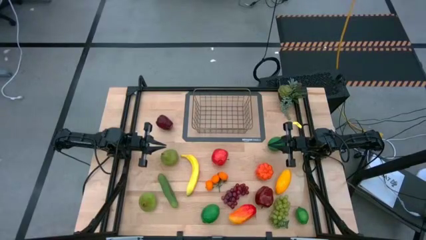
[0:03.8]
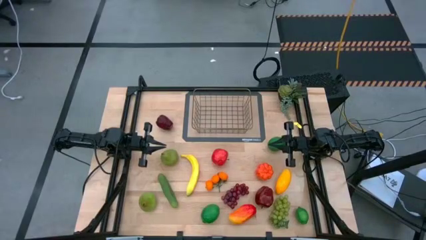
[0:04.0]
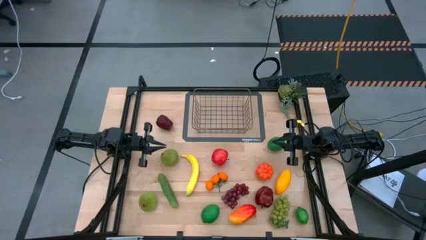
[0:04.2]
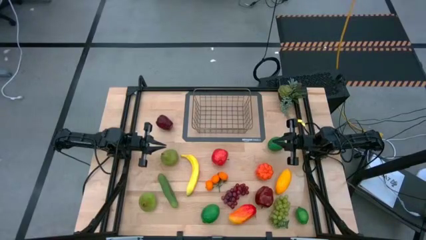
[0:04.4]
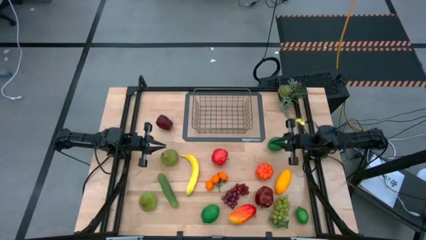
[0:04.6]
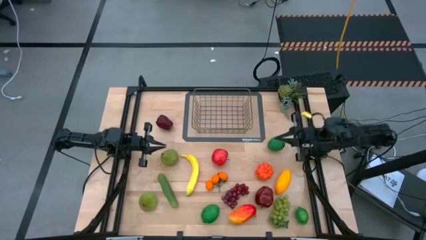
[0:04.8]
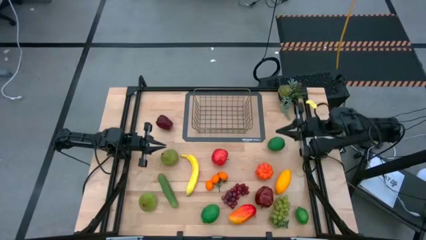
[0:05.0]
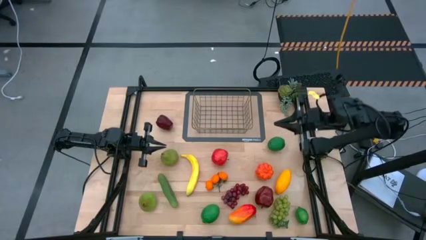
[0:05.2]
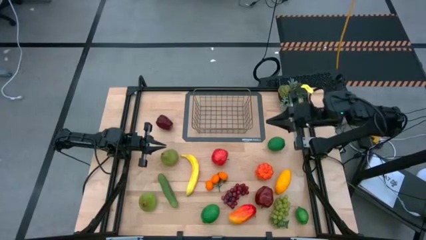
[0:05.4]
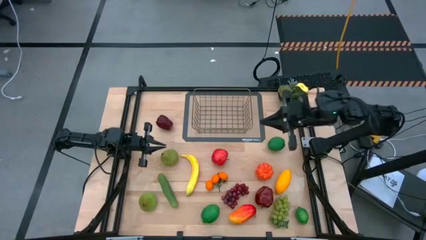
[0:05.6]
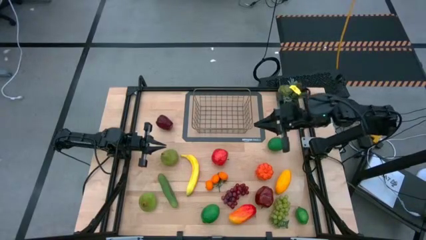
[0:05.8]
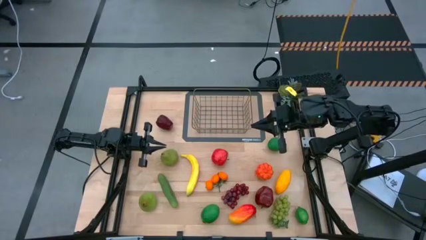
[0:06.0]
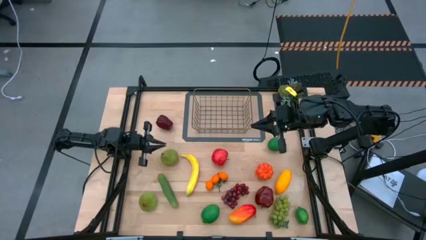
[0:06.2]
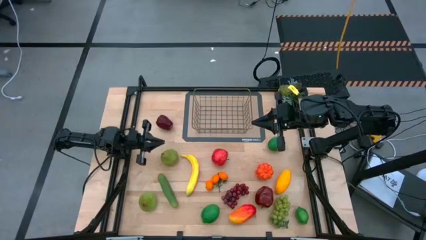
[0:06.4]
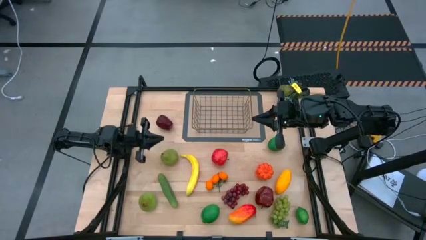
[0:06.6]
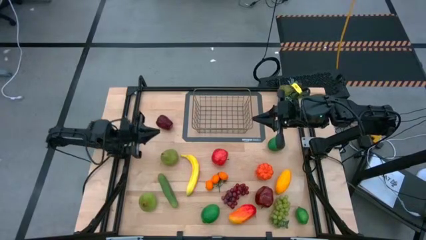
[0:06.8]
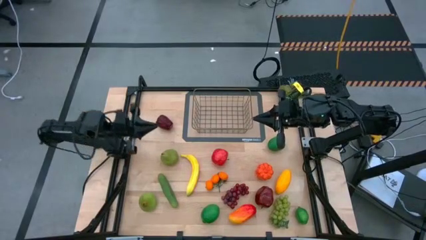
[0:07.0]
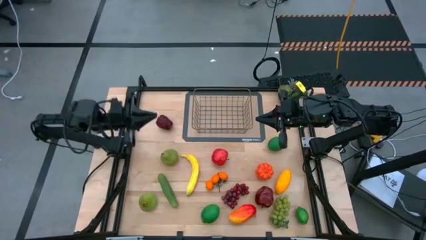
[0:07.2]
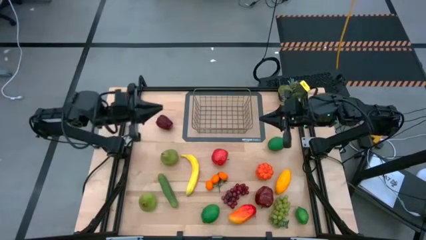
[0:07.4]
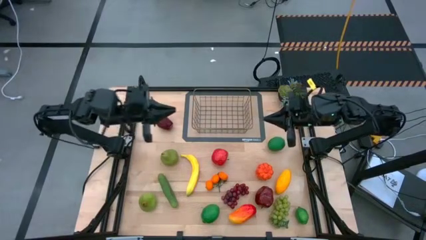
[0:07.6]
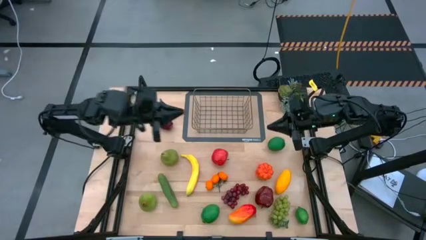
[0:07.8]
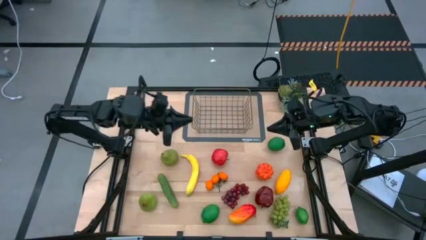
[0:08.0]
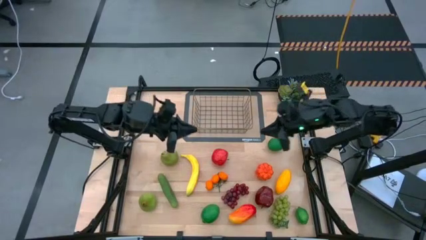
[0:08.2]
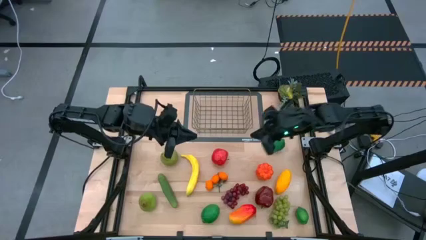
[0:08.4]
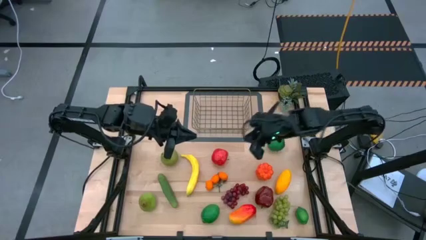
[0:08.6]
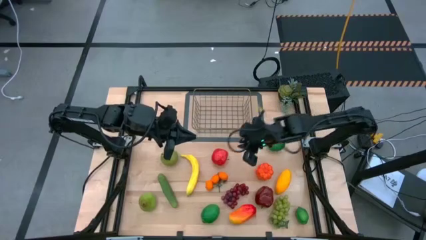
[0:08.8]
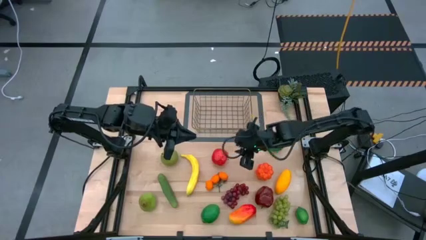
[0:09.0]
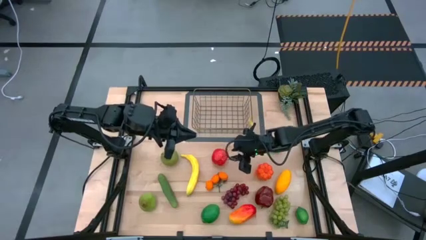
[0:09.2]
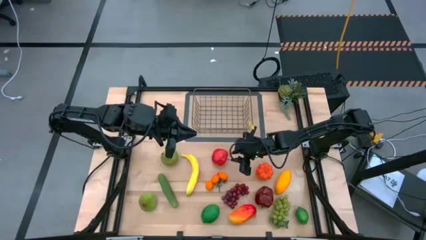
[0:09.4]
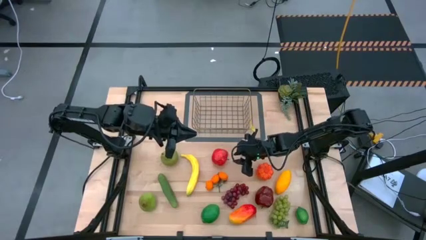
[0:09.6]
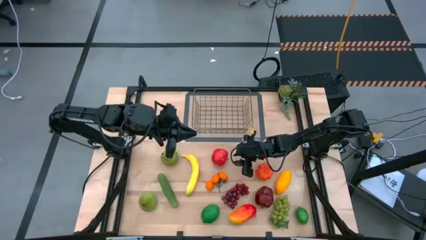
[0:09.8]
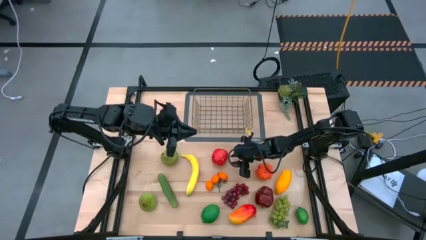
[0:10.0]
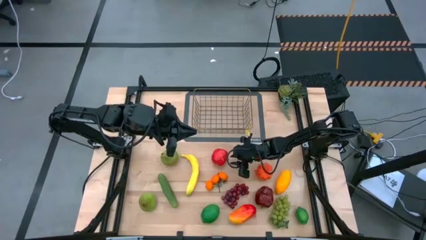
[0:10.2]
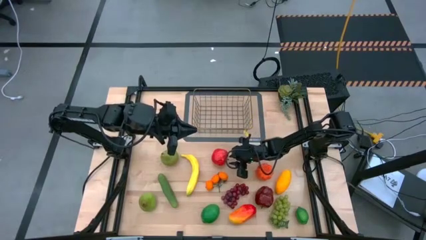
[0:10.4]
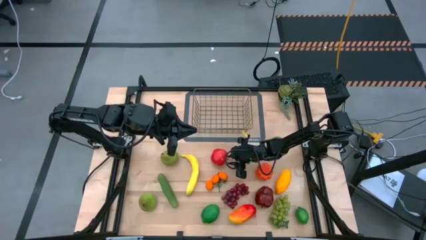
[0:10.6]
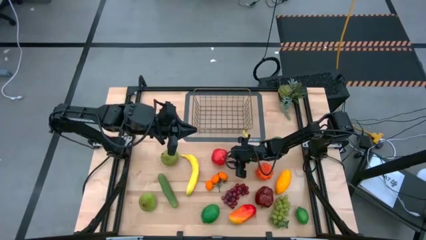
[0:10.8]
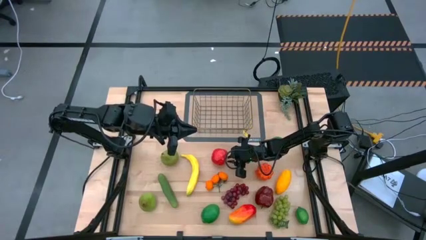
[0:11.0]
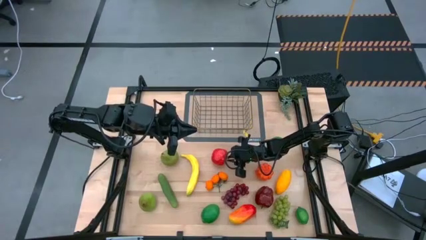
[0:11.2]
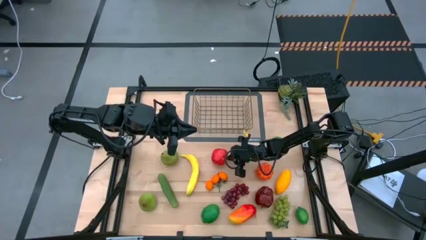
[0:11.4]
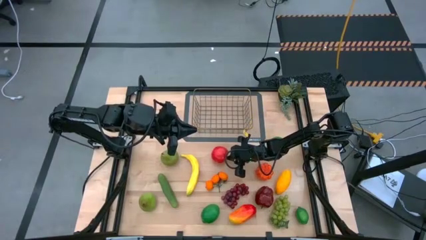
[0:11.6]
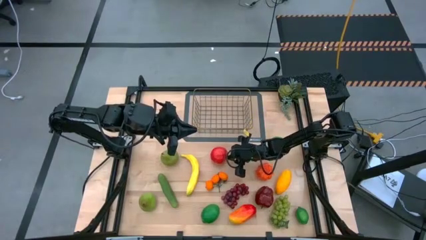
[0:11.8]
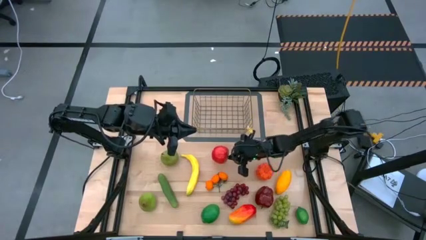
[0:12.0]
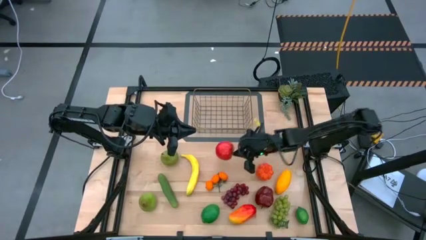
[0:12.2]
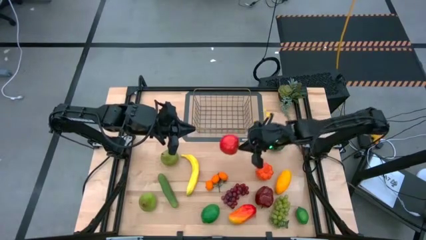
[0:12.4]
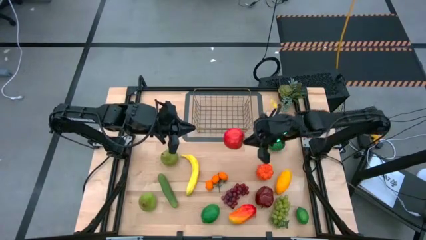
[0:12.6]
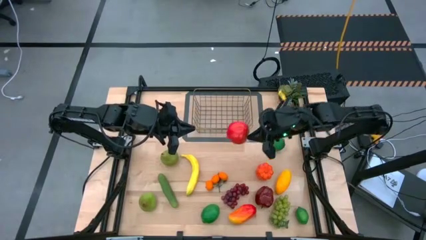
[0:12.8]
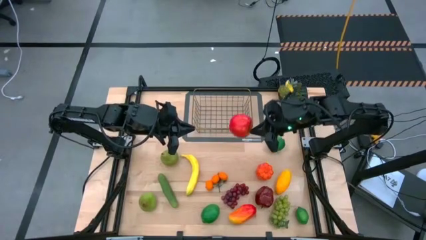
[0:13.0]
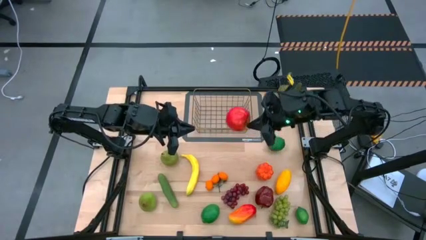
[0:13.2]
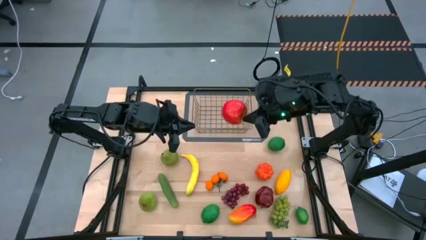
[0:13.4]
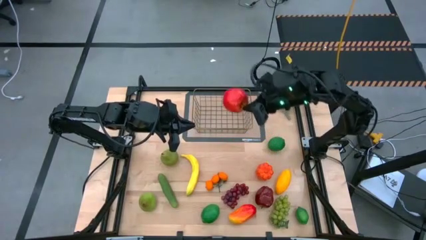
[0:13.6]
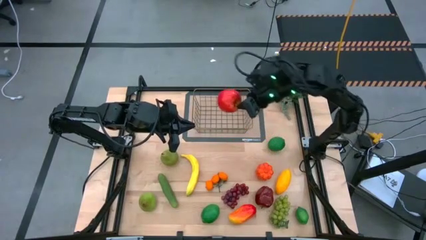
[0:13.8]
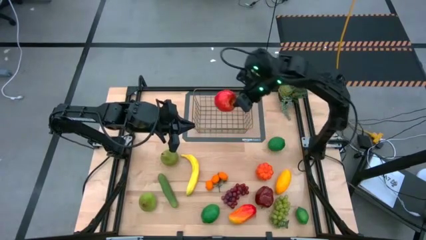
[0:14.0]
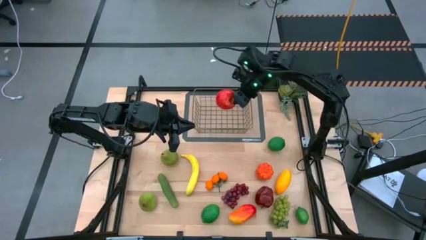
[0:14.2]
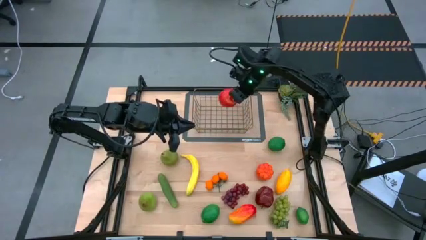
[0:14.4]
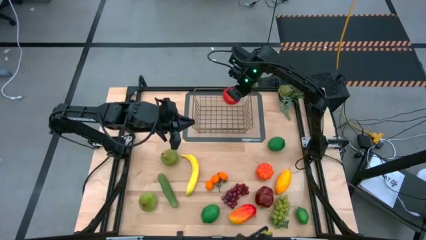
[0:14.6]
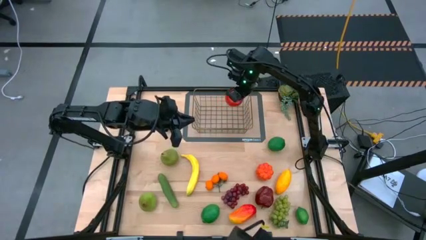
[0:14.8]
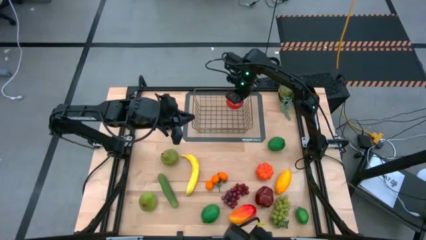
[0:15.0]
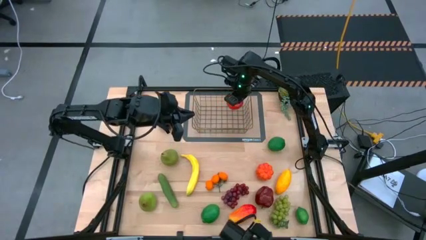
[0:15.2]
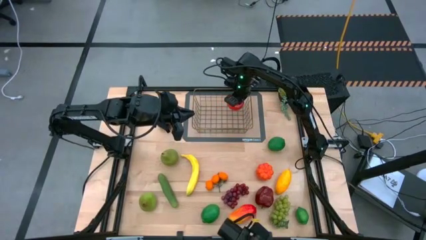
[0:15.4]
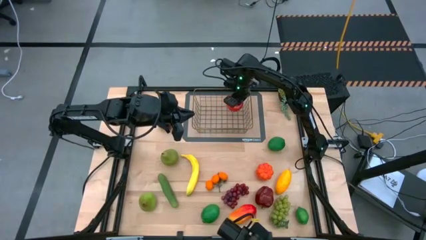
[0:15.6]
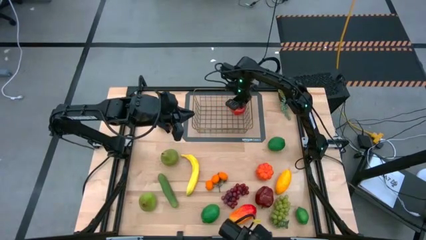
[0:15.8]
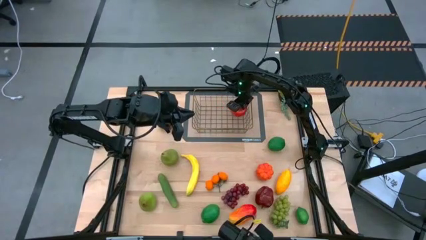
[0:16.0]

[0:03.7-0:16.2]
Task: Build produce basket
Put the red apple into the brown wire basket

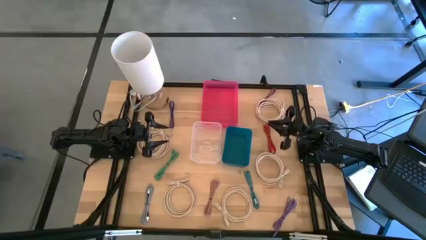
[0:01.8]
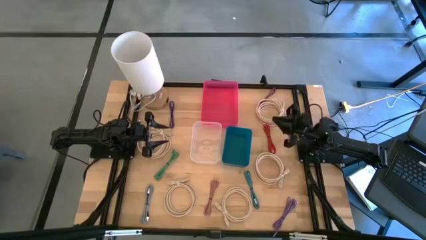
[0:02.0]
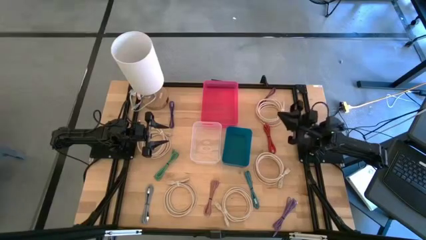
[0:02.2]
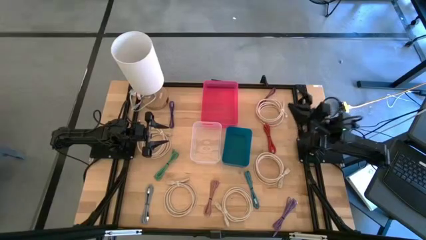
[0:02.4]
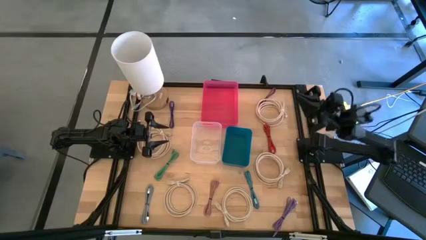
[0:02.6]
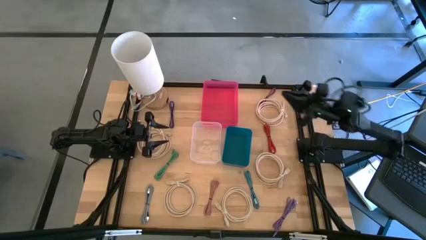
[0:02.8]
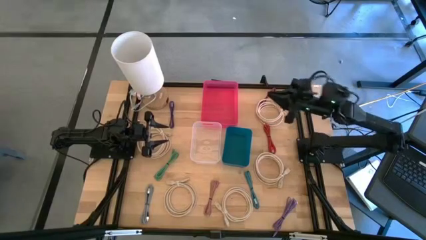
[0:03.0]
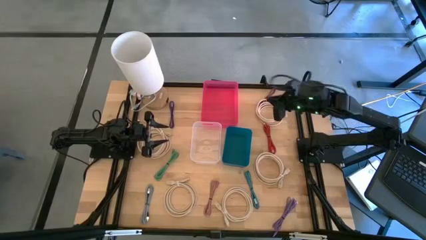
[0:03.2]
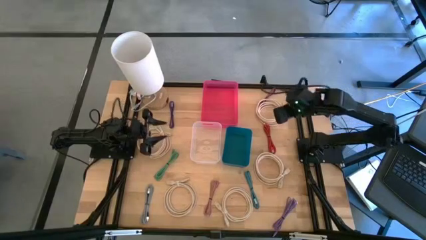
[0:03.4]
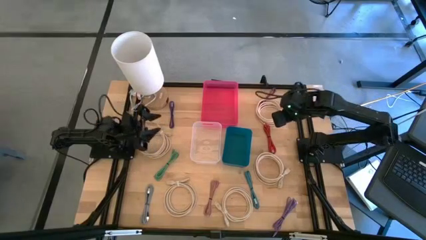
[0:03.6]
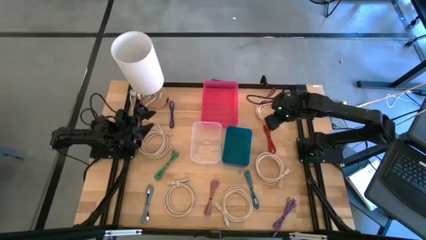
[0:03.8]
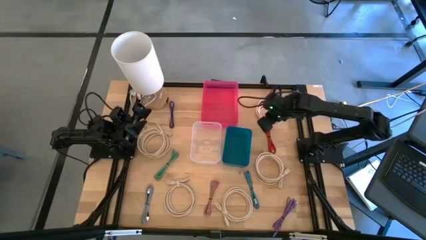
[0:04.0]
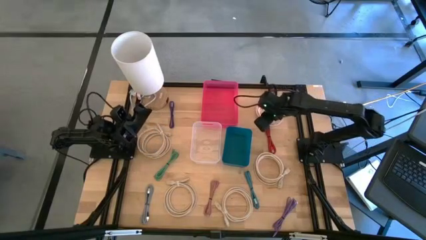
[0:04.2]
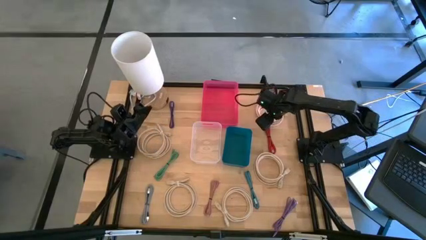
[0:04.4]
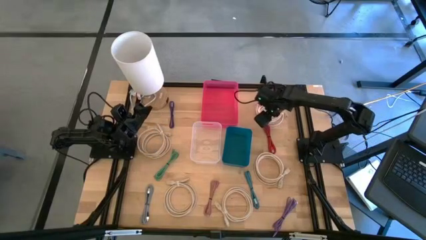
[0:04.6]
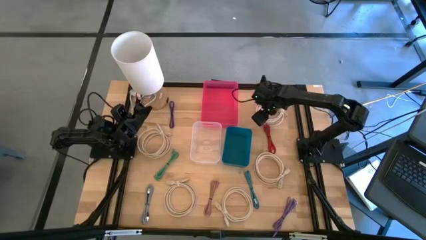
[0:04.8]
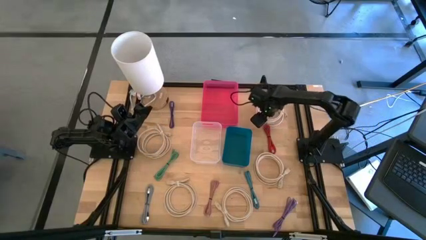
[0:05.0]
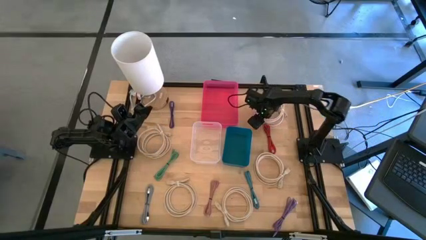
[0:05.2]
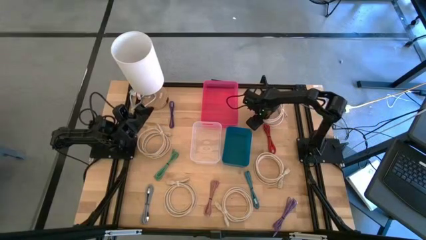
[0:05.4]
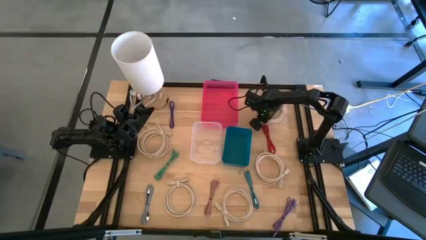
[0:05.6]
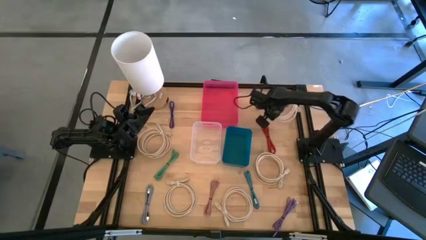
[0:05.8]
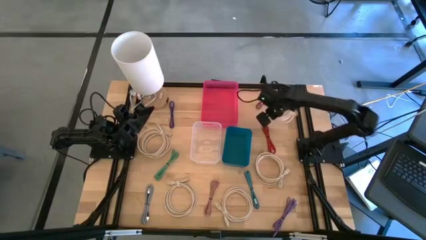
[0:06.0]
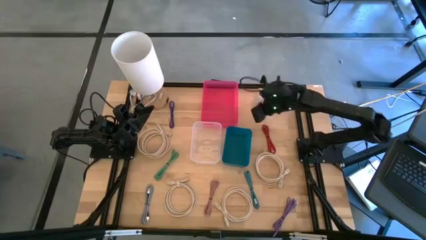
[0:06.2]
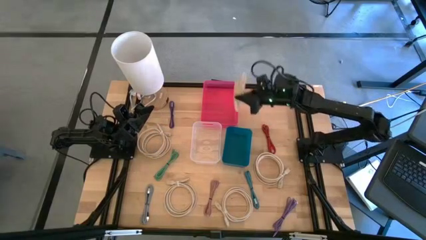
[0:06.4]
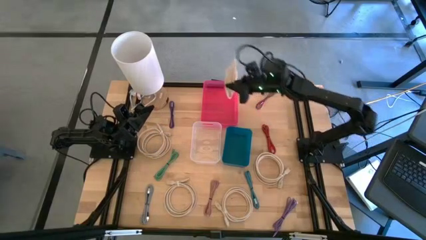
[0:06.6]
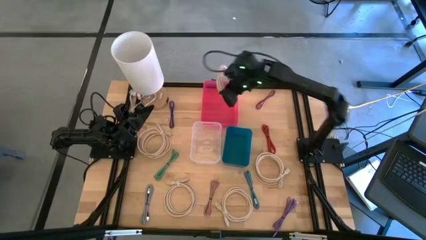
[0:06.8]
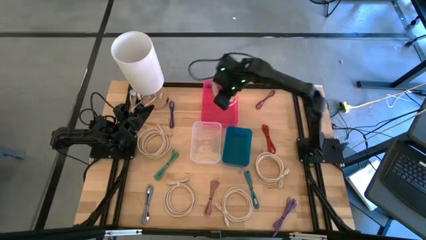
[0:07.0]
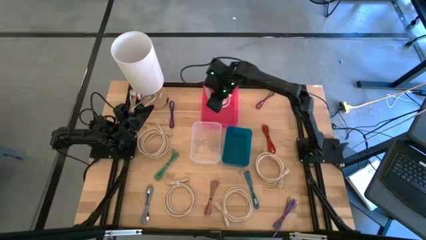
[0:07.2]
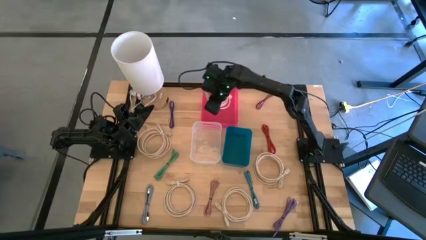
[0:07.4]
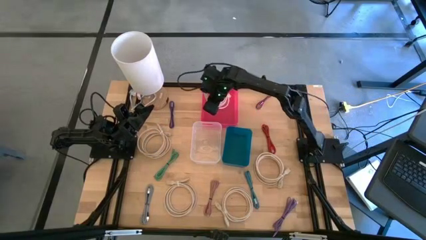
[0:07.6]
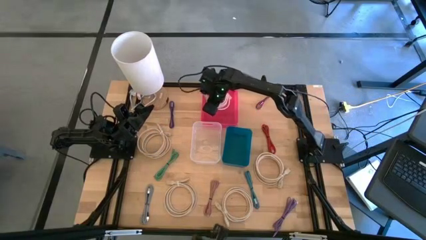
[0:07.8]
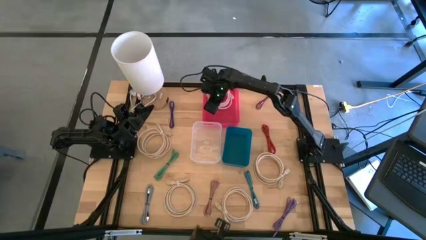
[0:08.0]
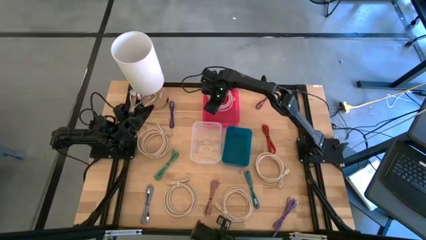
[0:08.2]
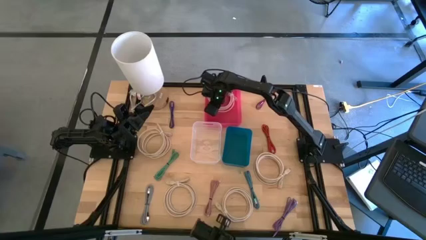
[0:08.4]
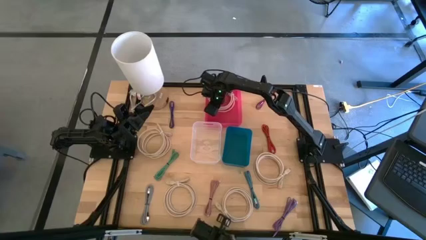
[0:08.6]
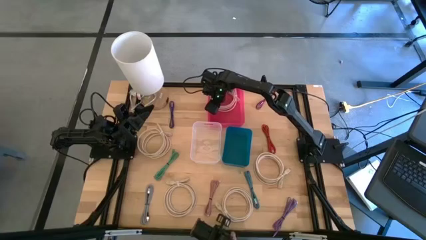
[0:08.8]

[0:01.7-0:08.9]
Task: Pick & Place USB Port
Put the light brown HDMI cable into the pink bin
